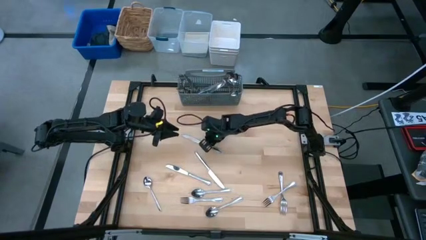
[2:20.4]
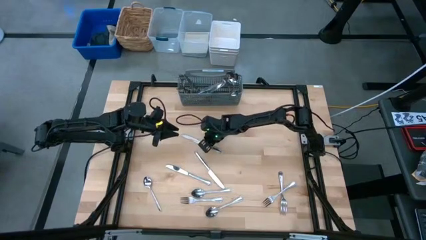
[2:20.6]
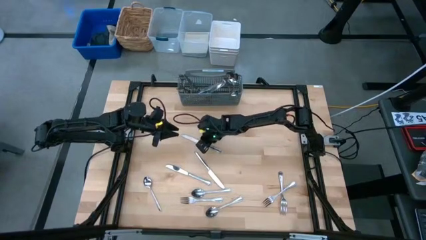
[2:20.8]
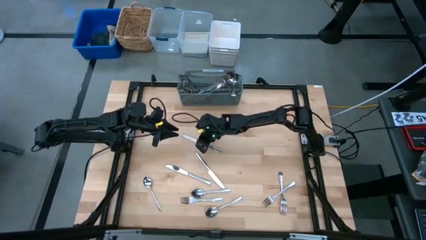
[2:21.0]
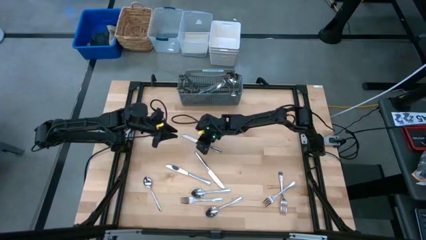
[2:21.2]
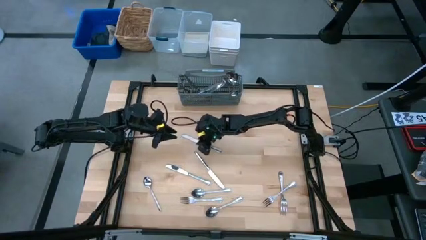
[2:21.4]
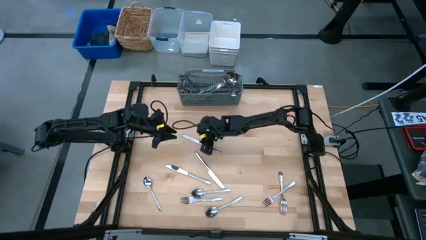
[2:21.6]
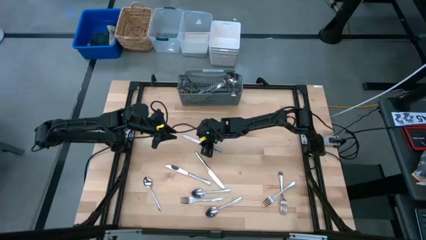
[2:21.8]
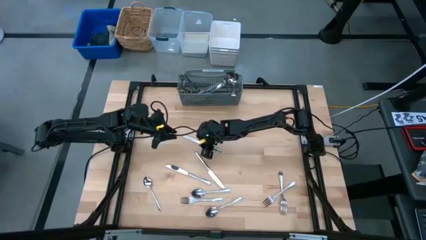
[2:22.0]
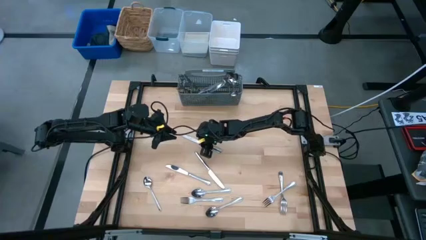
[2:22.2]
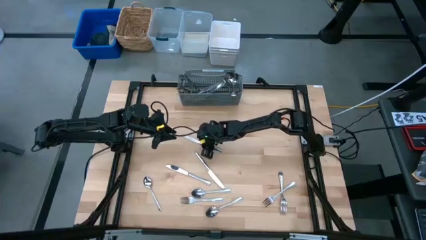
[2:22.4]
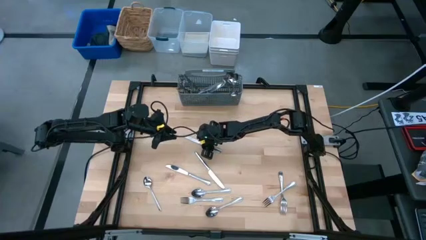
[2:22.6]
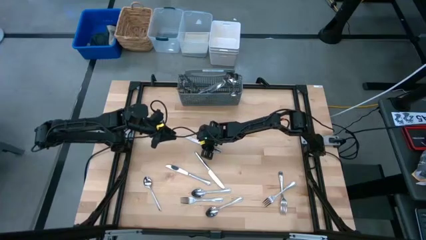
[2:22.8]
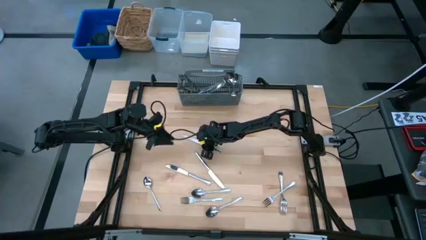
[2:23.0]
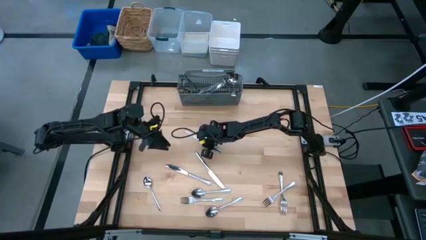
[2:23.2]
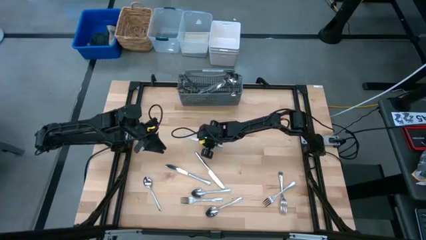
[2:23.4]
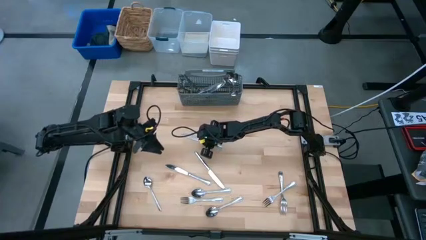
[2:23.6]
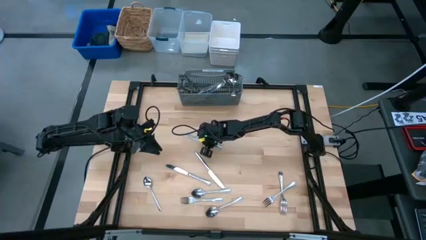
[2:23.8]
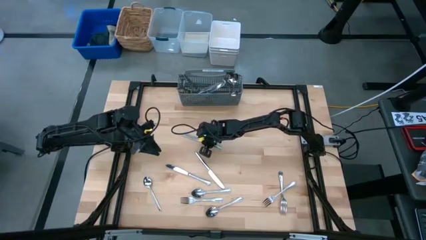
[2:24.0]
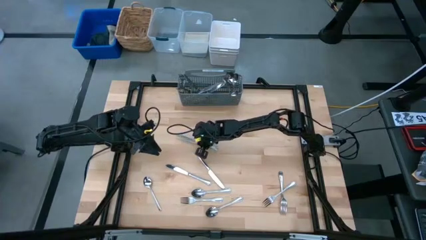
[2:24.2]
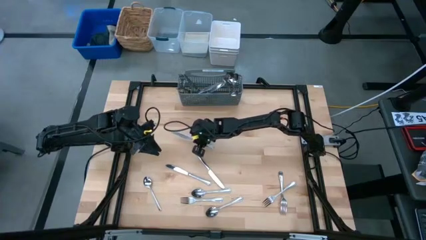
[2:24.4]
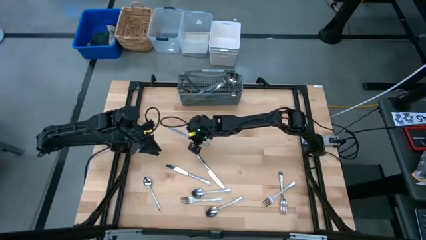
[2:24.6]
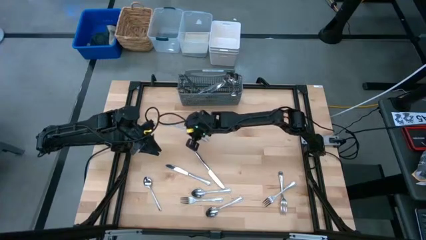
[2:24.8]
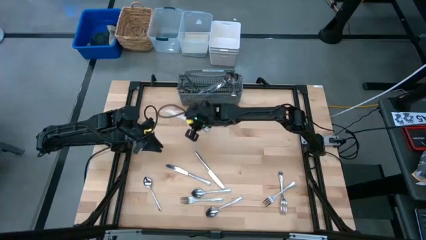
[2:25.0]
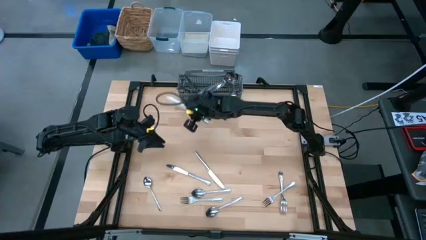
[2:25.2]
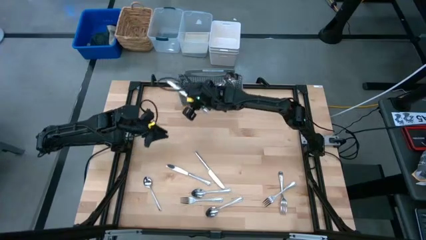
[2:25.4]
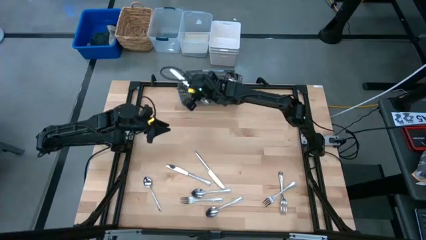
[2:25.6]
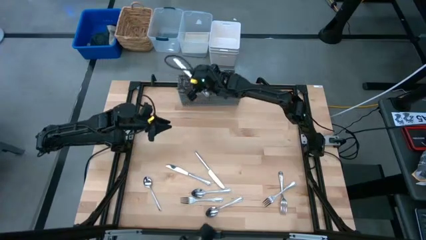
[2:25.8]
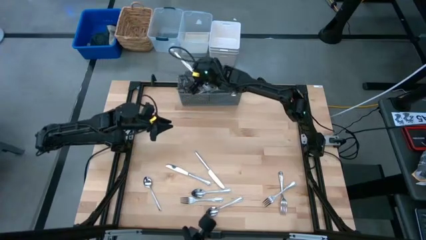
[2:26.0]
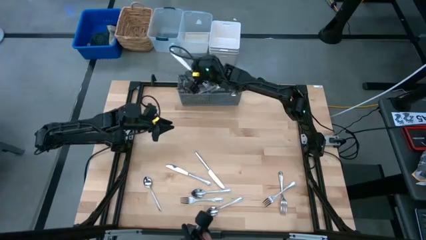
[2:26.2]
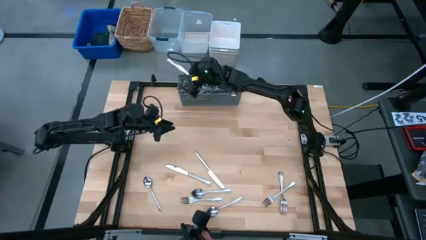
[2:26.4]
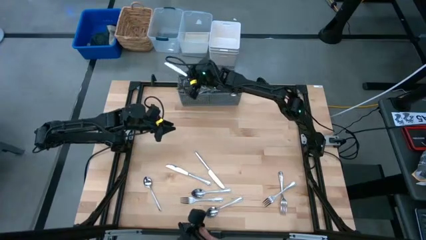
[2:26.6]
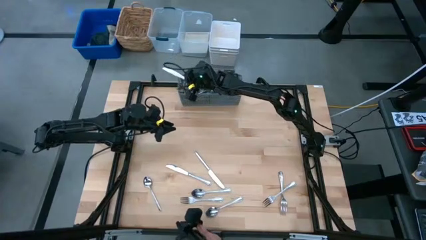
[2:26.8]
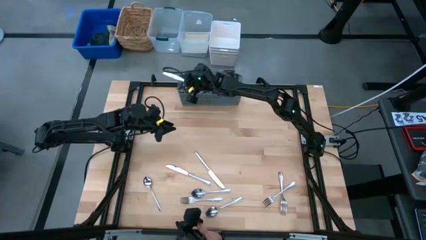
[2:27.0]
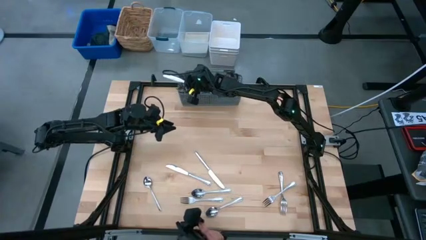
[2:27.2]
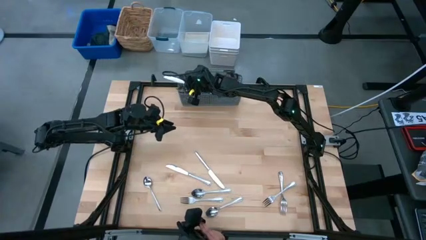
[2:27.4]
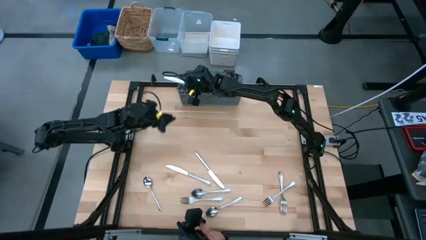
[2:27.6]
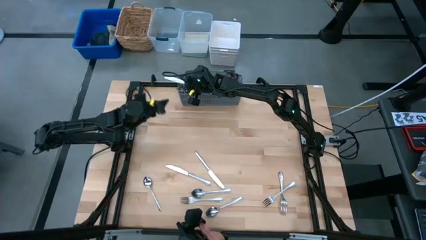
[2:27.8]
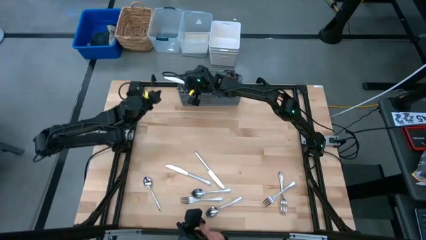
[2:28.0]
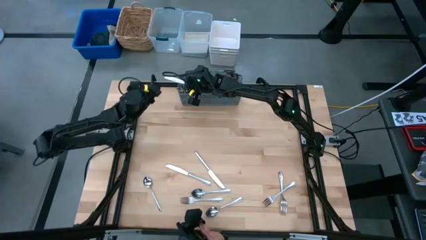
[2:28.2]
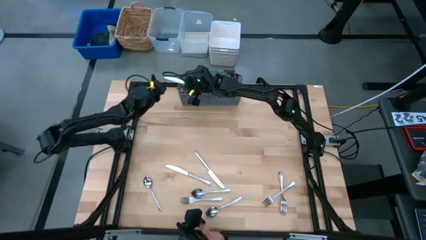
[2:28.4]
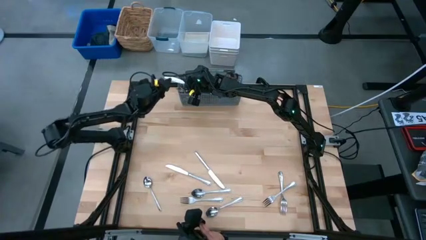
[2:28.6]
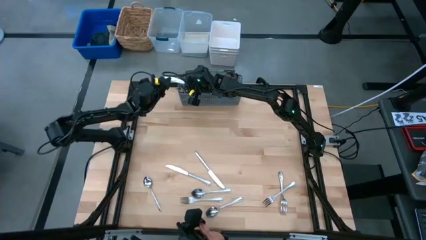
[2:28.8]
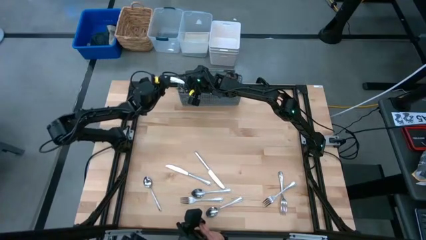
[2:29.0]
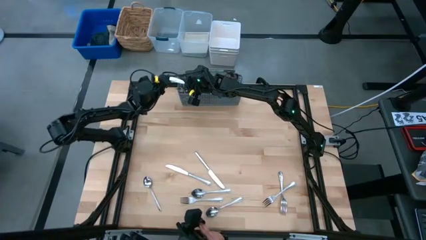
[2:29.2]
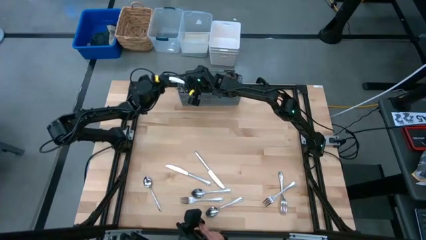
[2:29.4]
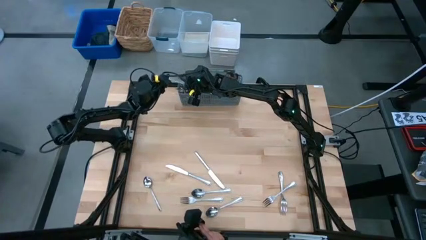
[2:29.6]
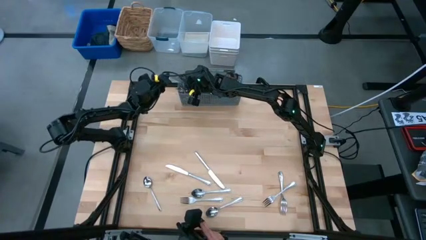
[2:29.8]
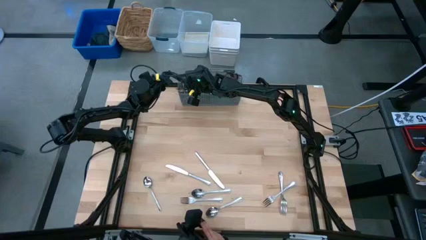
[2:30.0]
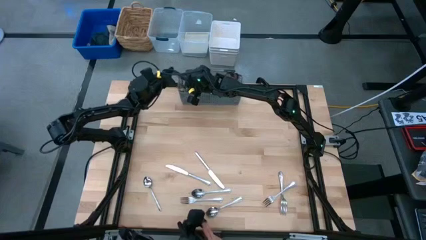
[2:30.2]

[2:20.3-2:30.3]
Put the silver knife into the dishwasher utensil holder

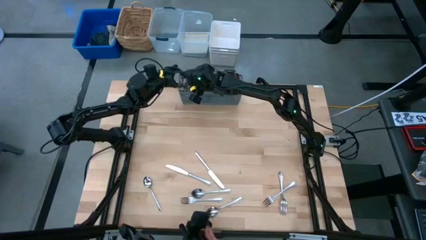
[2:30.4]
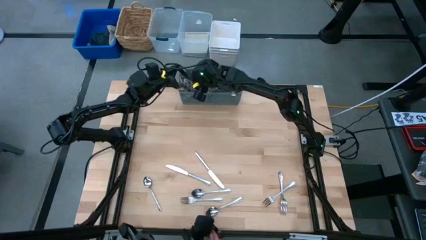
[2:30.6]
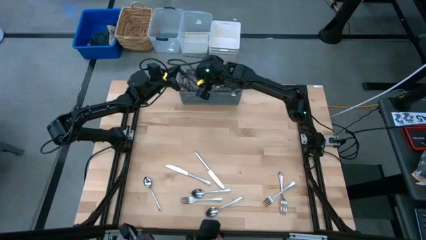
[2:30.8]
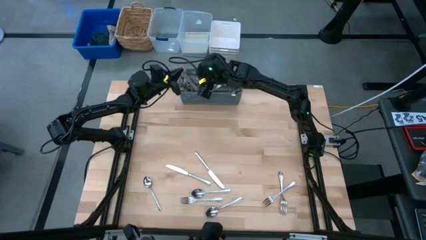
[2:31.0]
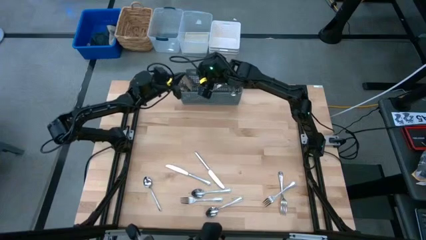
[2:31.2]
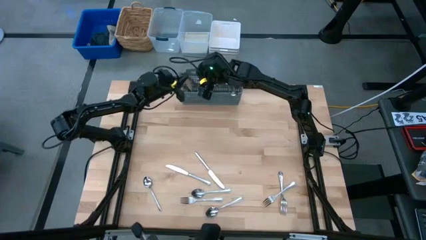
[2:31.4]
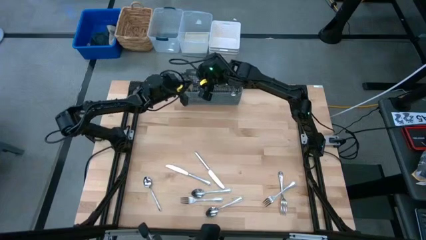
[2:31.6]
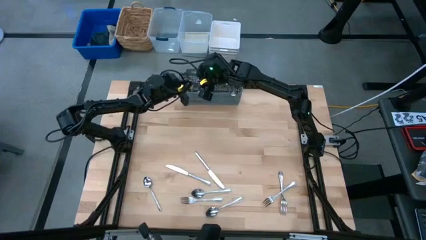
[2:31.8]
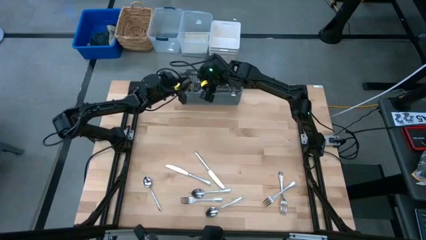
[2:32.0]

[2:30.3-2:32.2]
Adjust silver knife in the dishwasher utensil holder

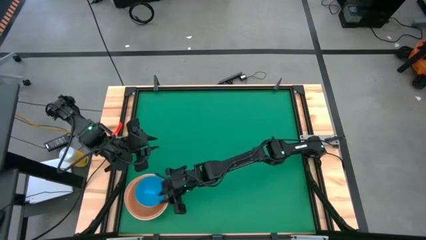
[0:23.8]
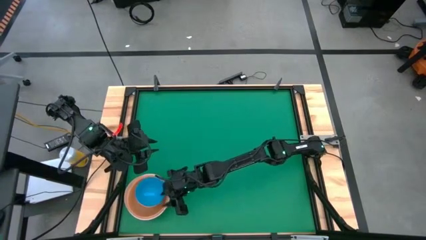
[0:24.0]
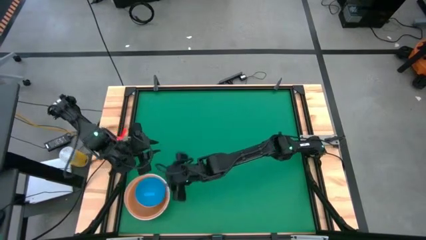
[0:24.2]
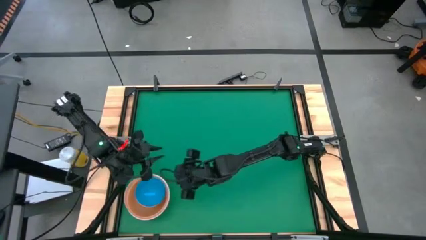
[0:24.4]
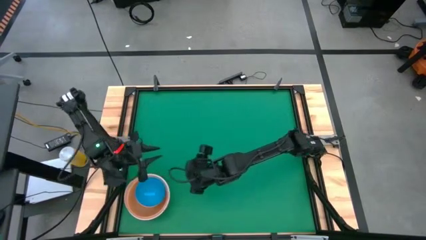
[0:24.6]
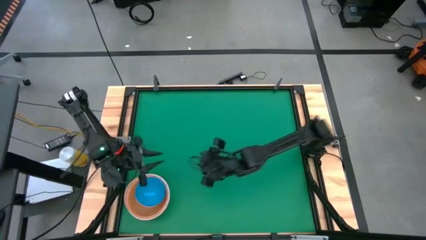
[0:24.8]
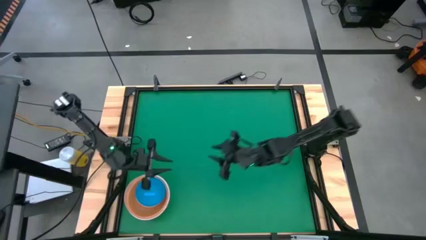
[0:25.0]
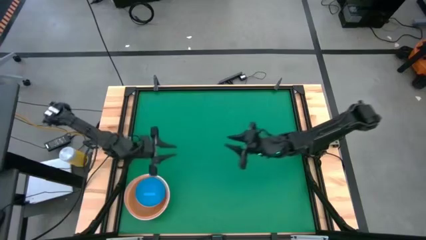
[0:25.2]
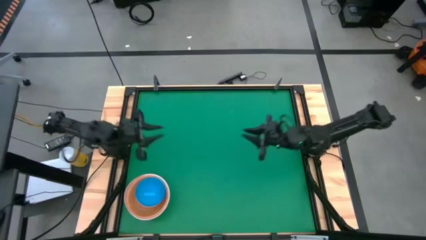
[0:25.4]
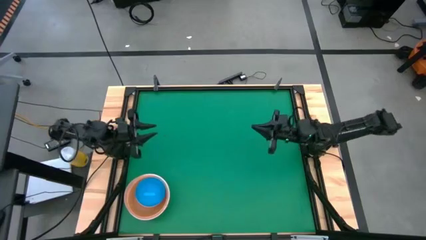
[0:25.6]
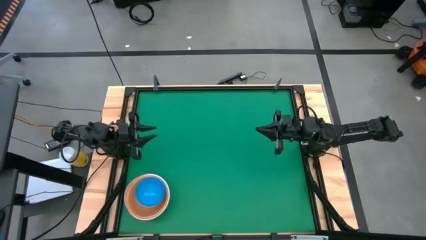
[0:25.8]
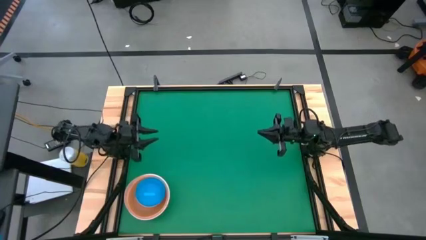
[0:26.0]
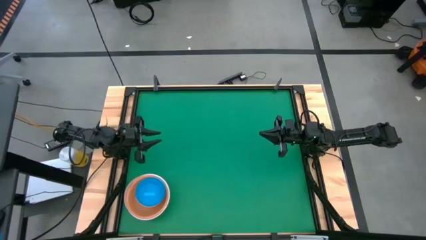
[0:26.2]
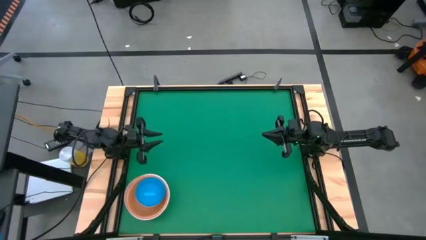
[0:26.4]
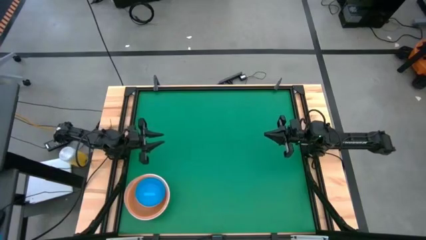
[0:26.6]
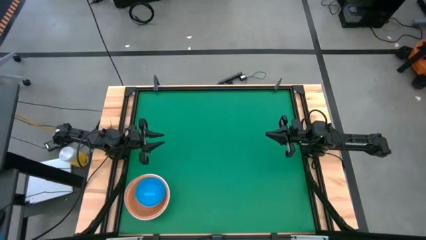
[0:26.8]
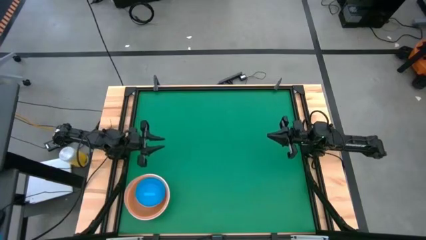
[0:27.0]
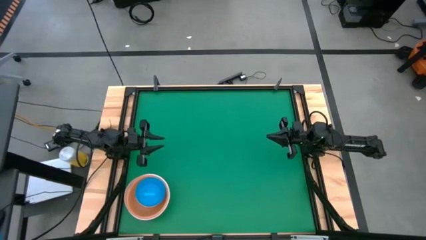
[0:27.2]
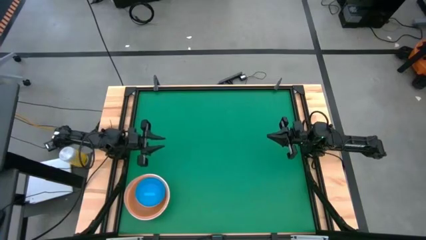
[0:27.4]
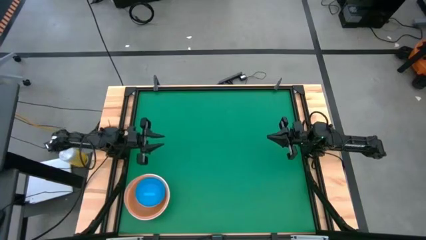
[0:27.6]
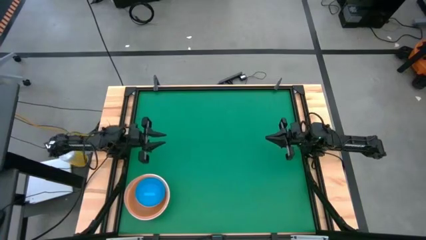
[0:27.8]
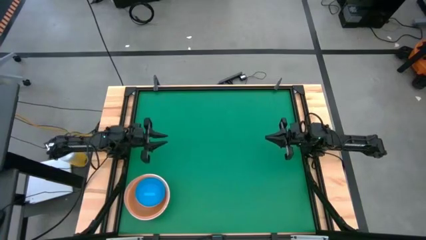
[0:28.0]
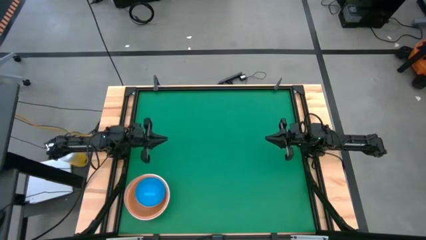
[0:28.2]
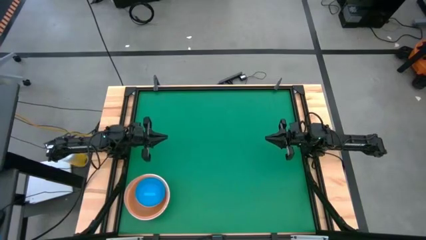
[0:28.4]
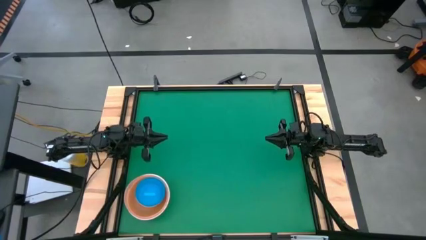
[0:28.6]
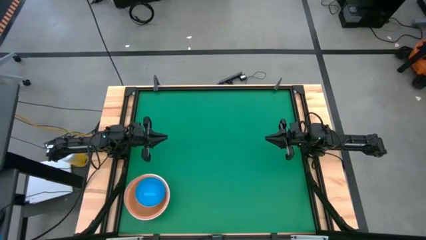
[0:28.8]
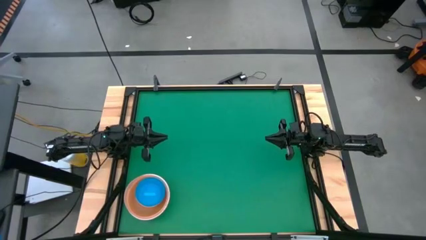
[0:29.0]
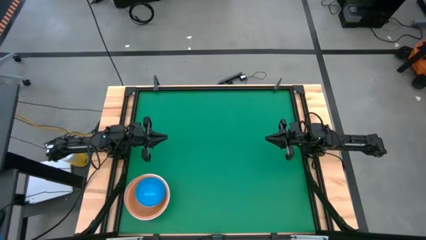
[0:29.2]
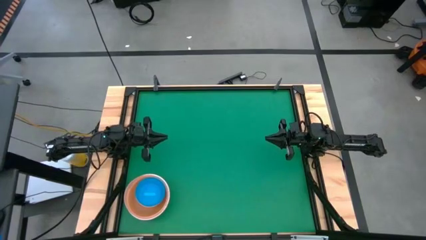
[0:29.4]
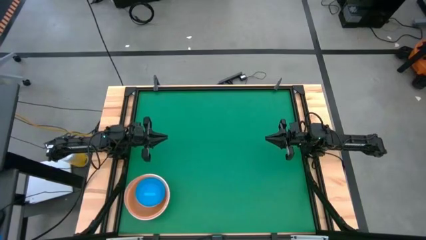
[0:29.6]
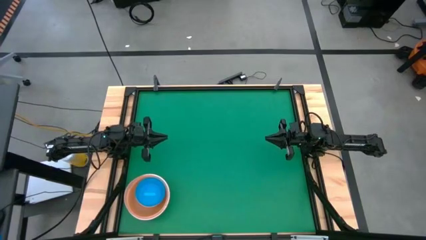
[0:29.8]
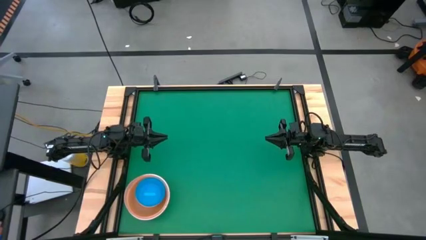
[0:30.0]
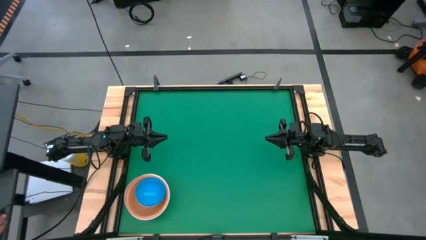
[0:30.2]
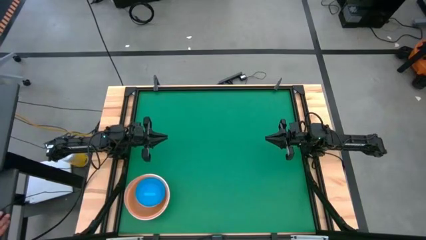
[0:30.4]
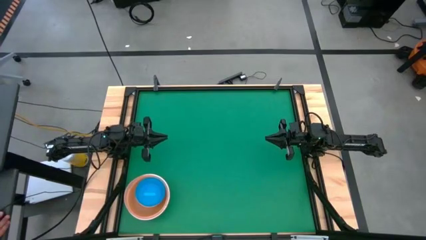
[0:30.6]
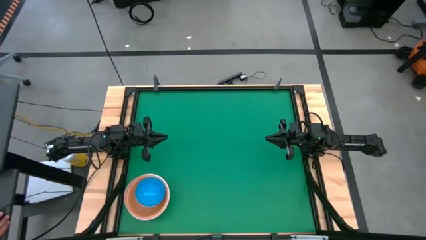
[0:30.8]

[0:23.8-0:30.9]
Return to Home Position
